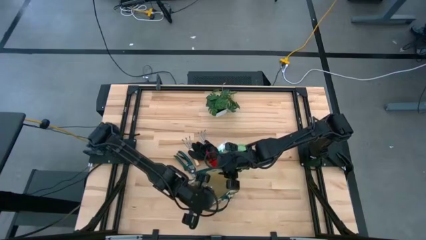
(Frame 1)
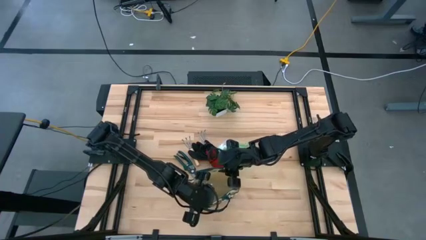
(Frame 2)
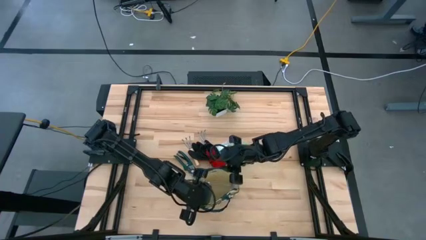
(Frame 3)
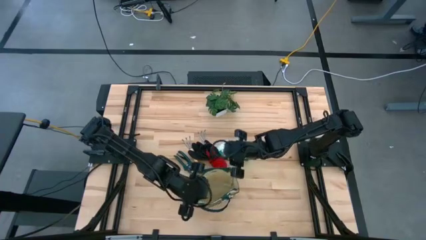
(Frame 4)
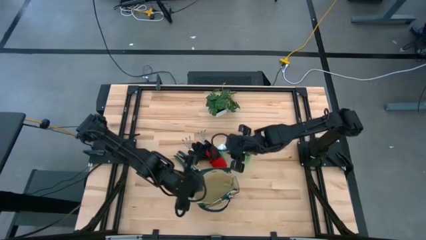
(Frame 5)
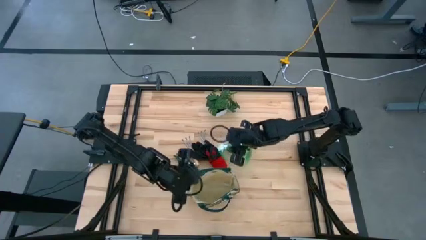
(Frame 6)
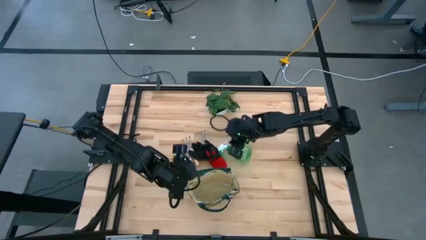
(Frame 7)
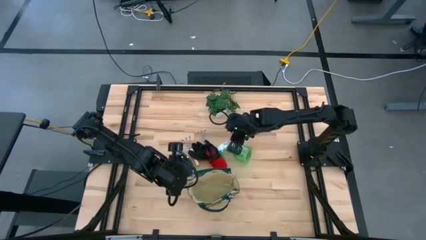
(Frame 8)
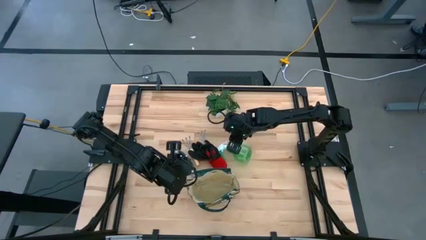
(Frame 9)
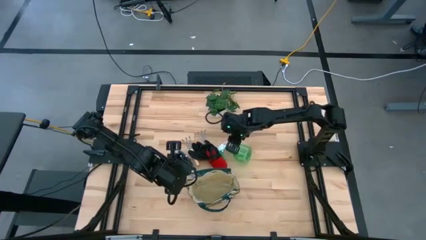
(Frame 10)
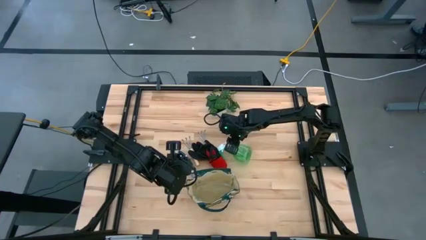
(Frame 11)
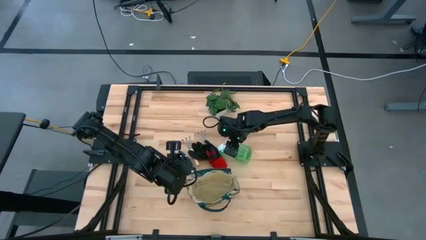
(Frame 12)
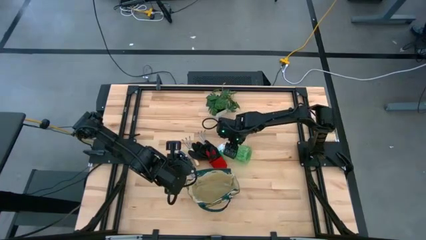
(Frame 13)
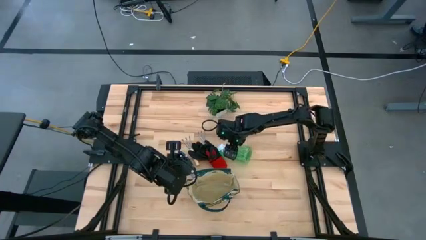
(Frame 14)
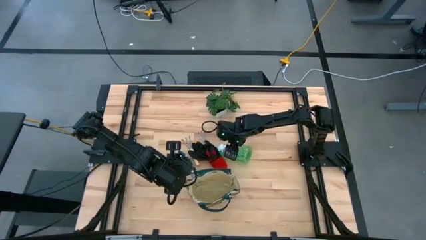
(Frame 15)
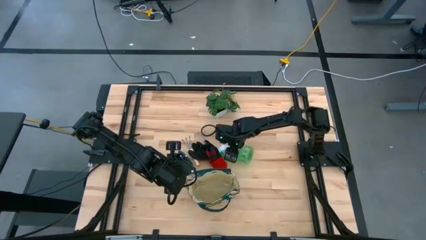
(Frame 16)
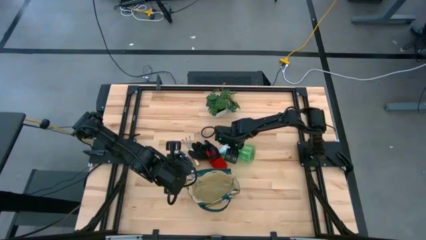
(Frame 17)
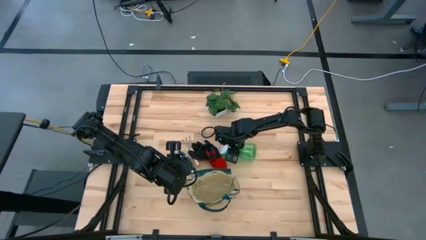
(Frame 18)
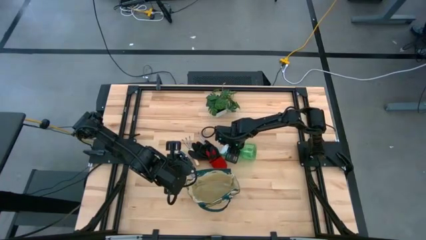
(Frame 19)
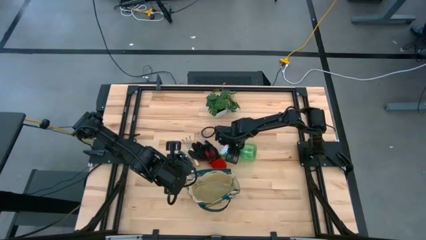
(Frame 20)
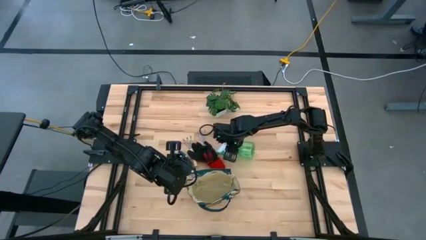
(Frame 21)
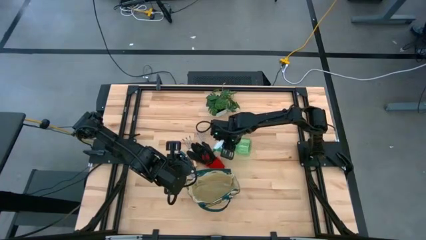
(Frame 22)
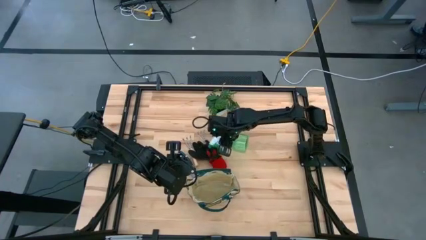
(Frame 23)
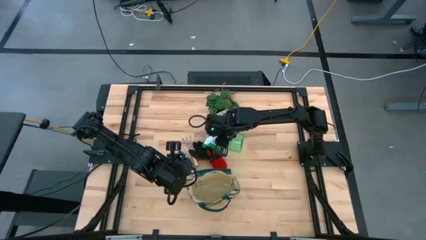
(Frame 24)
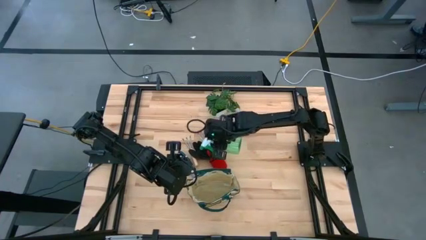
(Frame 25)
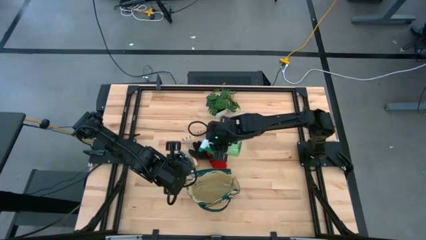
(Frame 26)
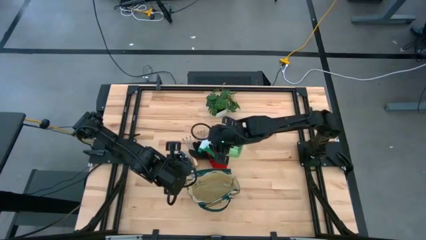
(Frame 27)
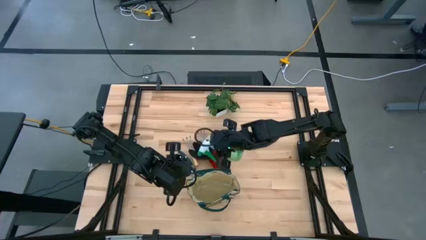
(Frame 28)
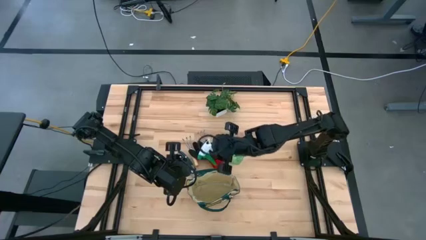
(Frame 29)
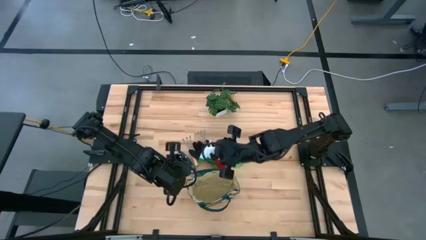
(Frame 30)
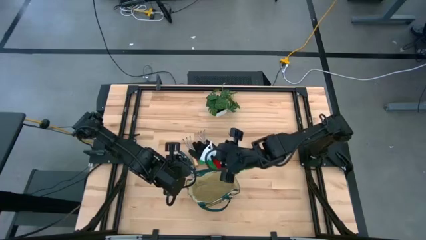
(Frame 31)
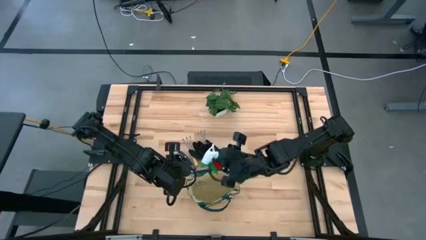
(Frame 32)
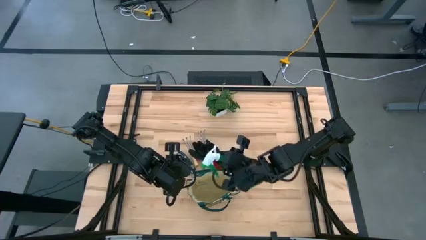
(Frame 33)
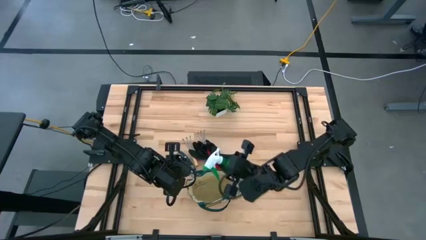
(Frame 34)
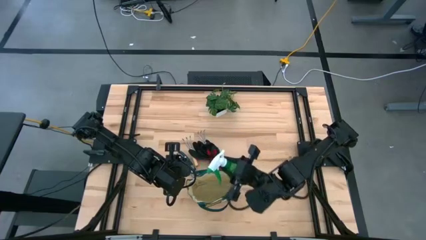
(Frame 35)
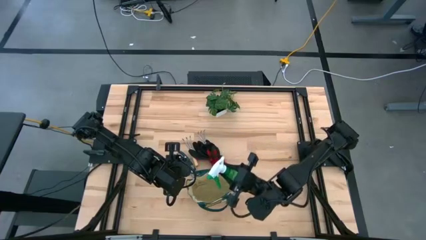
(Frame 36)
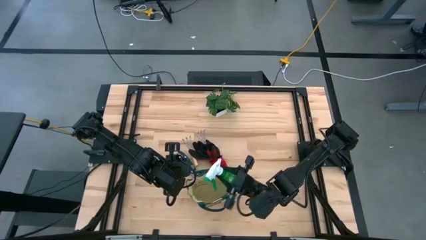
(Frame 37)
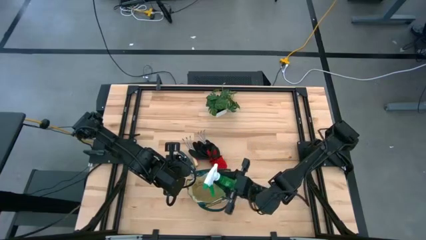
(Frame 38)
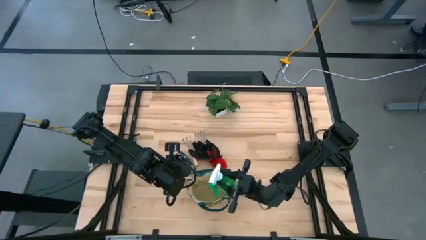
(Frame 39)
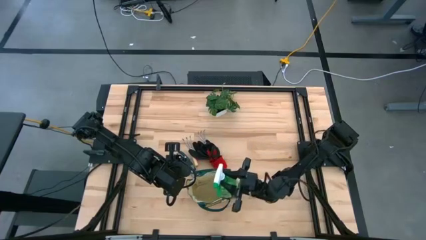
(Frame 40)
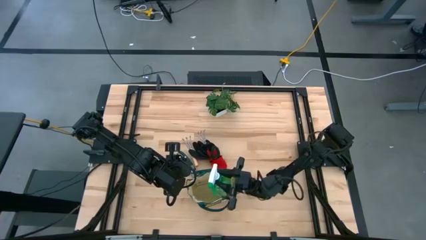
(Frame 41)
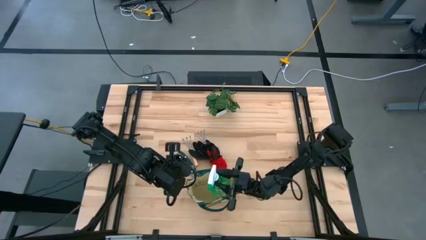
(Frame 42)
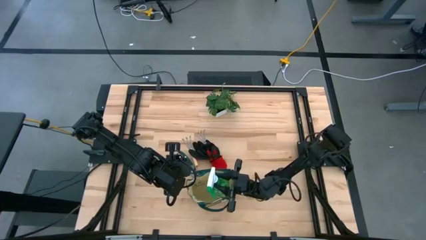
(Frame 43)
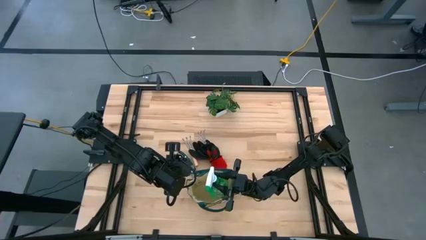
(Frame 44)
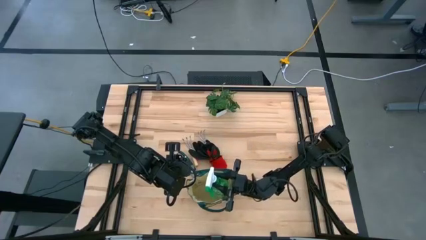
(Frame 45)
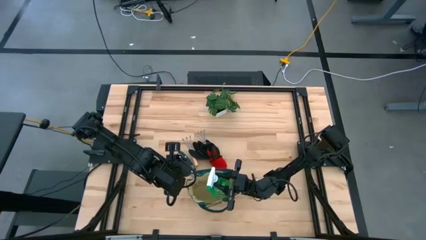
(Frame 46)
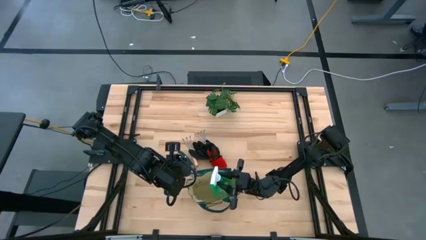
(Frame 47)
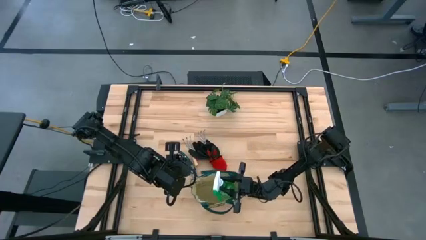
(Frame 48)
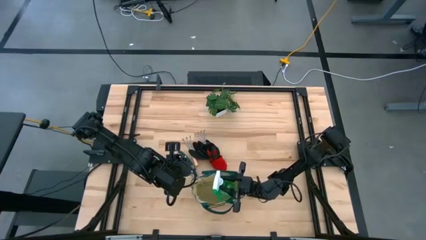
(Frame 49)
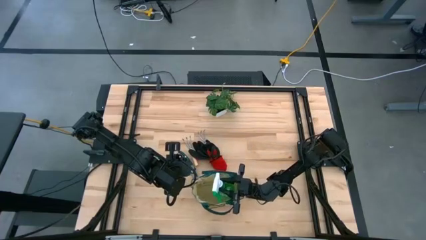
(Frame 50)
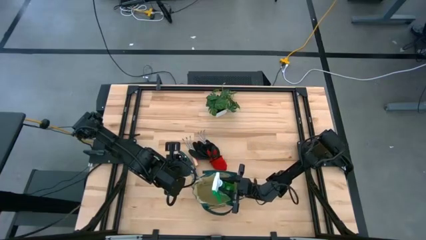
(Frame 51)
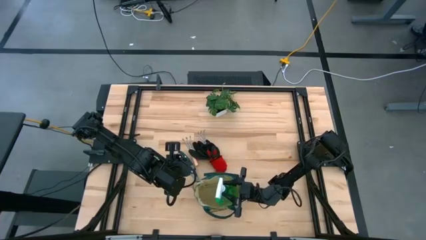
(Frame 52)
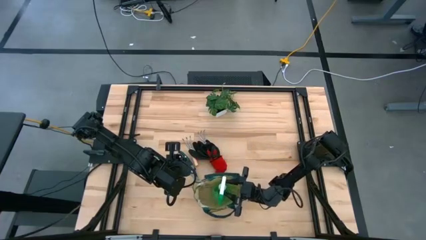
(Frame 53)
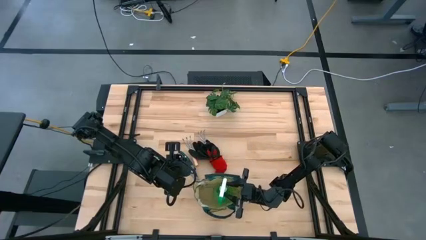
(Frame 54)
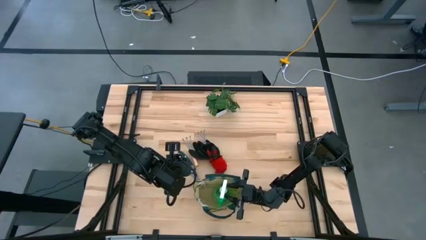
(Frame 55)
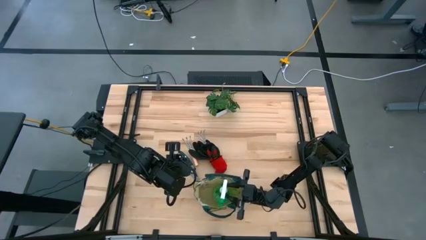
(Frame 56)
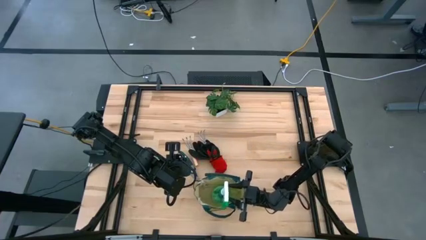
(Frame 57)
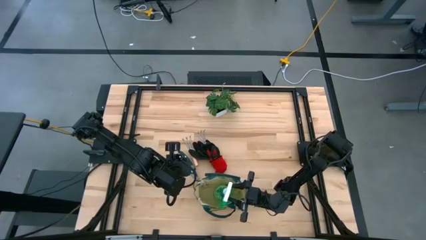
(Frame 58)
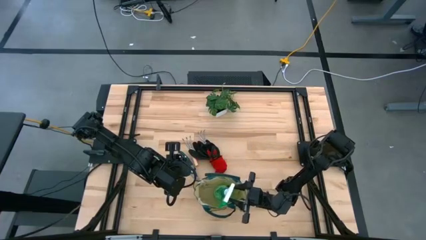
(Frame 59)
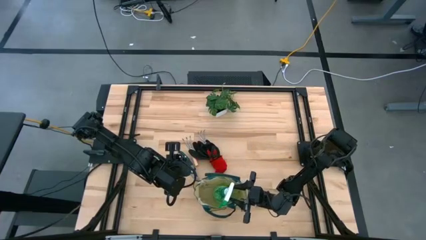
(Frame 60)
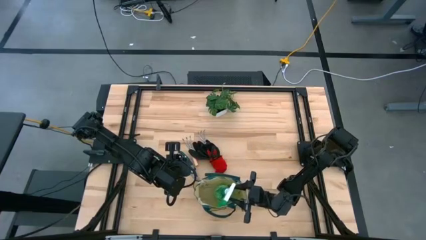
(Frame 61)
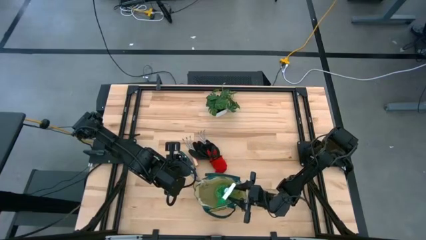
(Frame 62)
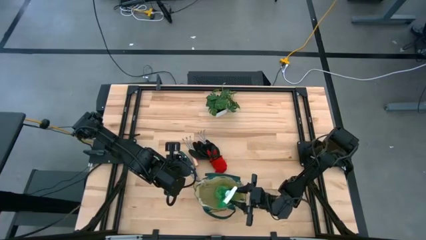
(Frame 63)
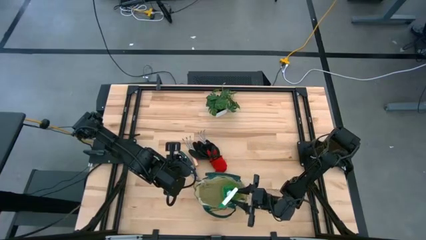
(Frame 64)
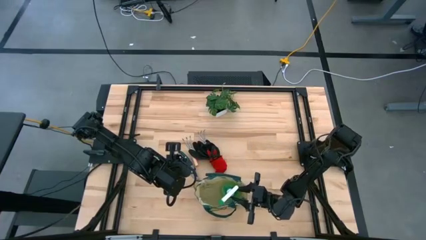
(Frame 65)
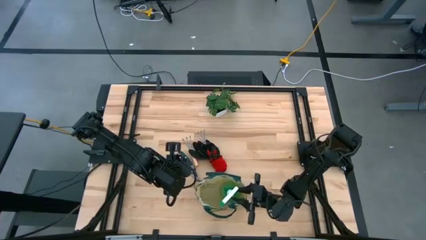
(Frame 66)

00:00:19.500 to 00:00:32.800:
Task: Pick & Place Garden tools in Gardening bag
Put the green spray bottle into the gray gardening bag

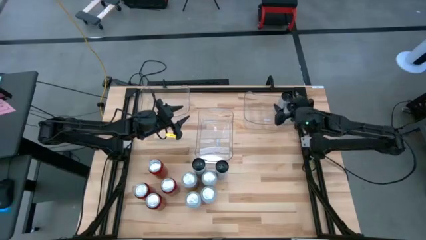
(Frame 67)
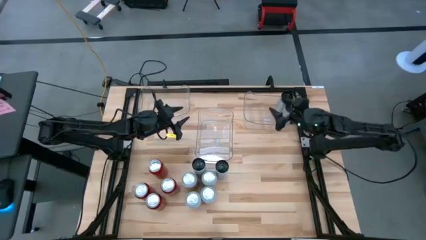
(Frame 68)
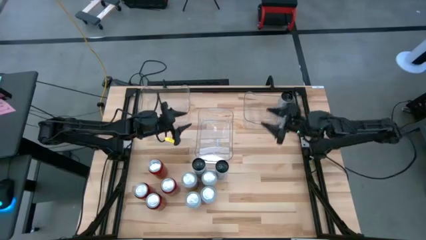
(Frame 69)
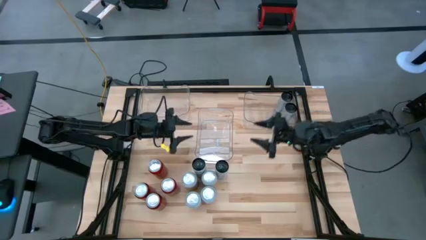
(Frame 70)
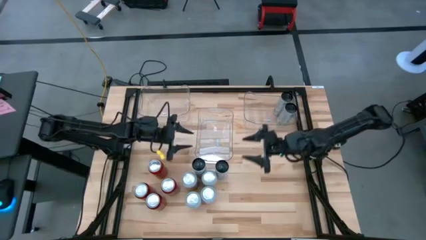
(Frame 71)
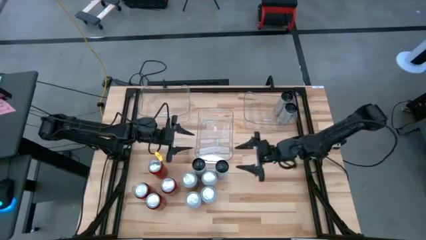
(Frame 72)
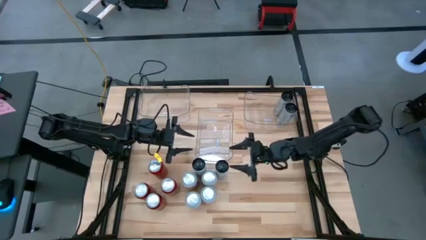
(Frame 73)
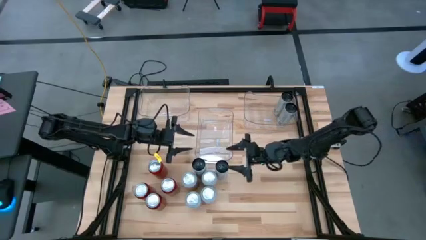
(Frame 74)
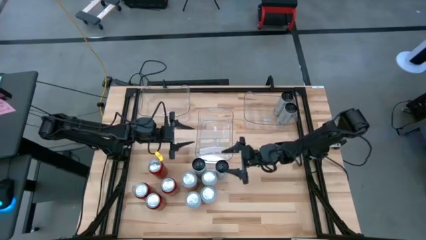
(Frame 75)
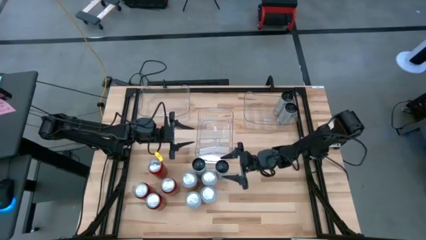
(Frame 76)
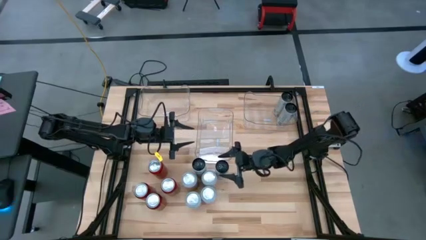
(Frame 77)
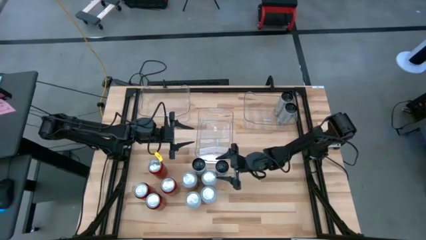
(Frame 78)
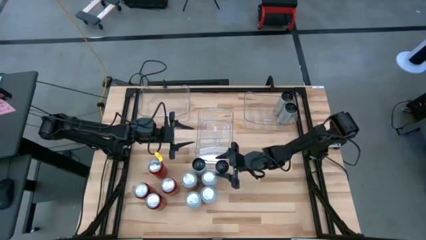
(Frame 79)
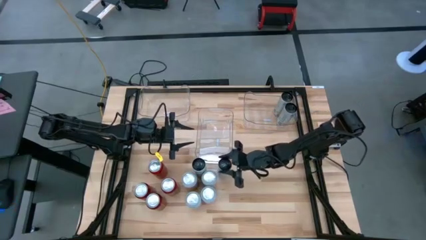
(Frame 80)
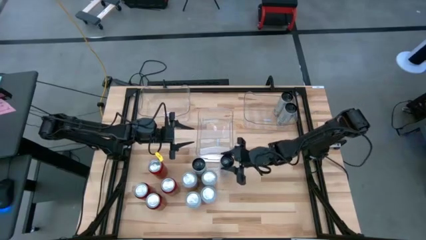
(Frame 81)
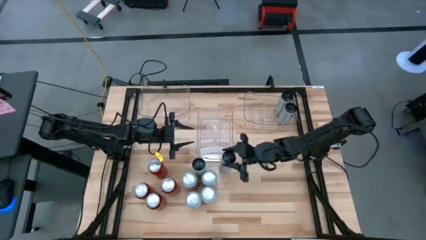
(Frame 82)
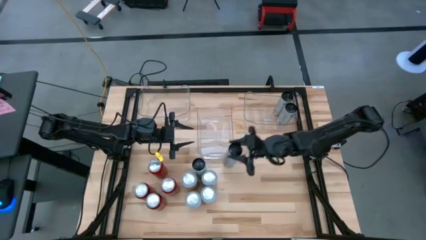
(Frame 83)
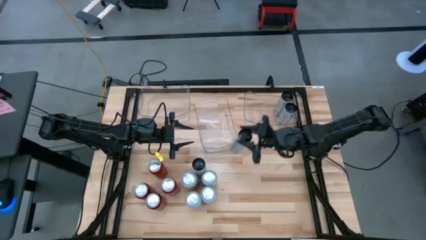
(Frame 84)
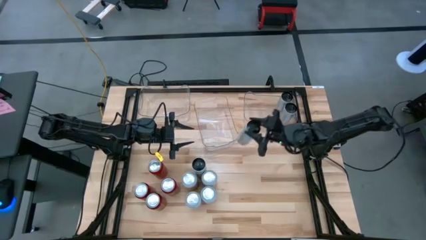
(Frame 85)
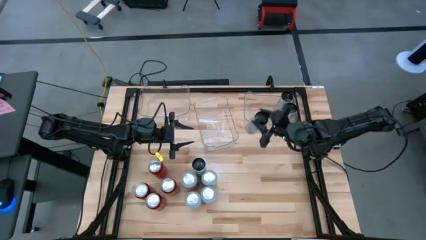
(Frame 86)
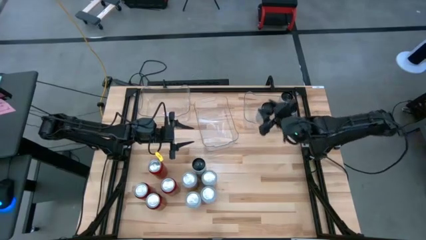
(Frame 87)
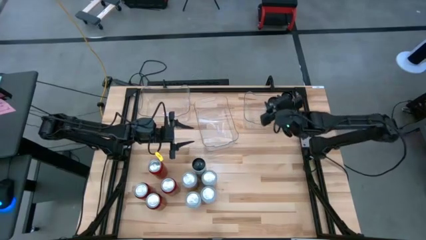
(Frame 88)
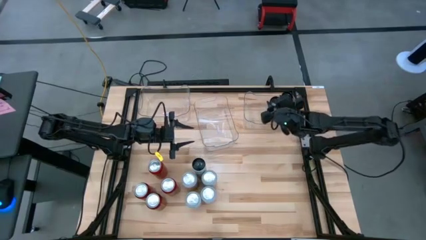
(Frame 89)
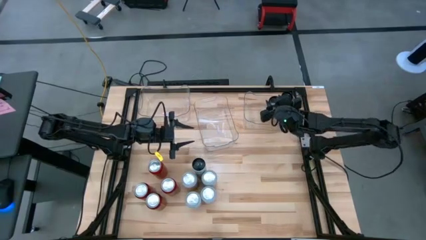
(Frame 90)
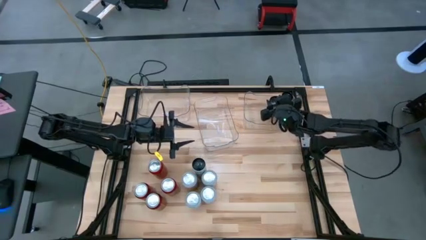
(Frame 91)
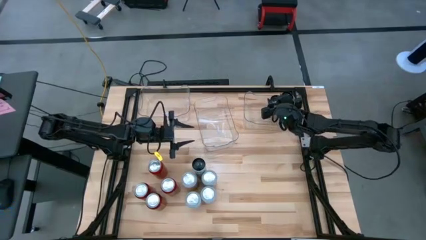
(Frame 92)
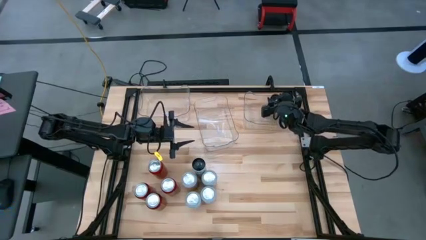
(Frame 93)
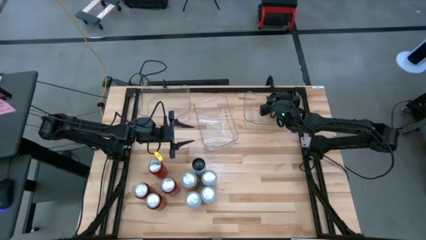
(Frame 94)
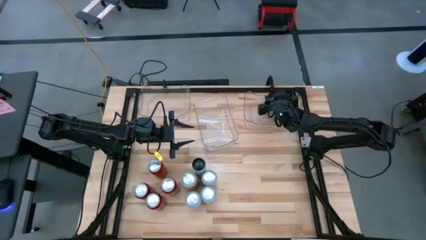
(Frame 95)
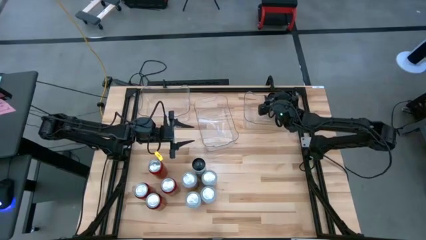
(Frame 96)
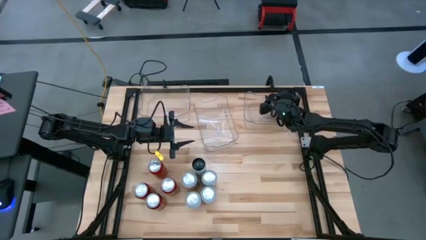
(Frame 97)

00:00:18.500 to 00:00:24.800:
Task: Sort soda cans
Put the right black and white soda can in the right transparent bin
